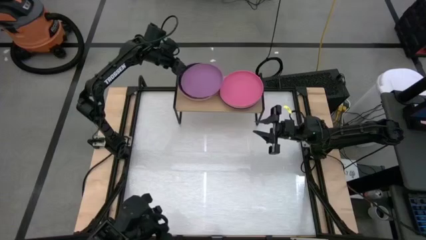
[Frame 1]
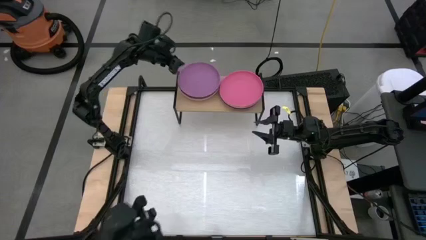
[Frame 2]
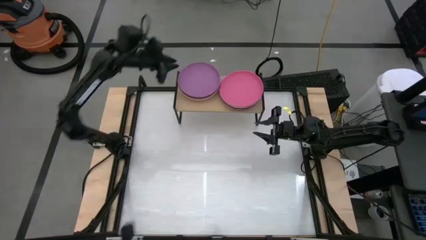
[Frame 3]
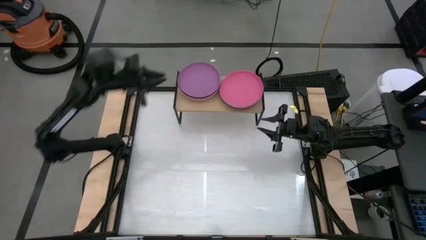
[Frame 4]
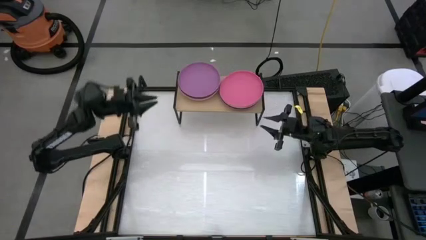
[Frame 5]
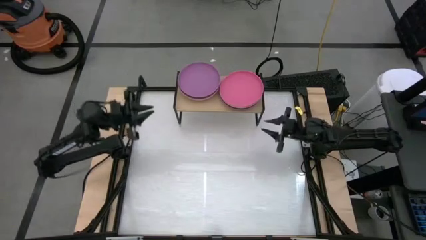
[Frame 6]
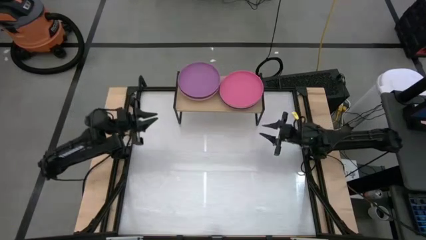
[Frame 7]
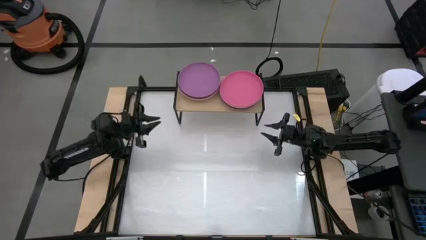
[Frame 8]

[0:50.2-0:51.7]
Task: Place and stack plates onto a shelf
Return to Home Position

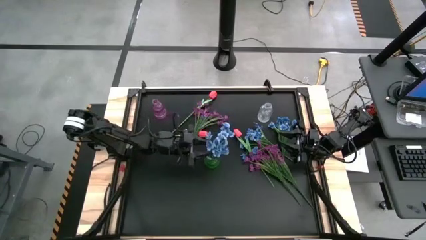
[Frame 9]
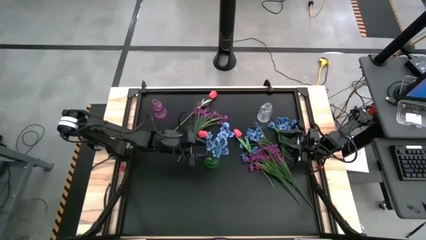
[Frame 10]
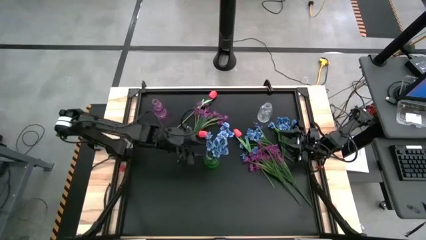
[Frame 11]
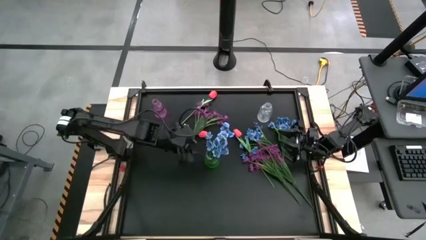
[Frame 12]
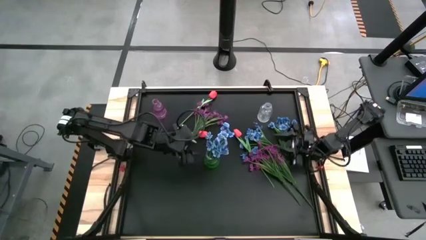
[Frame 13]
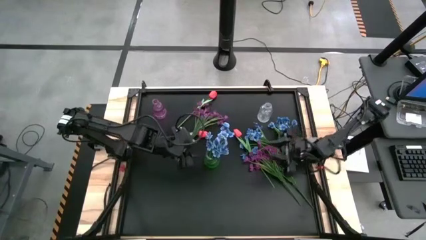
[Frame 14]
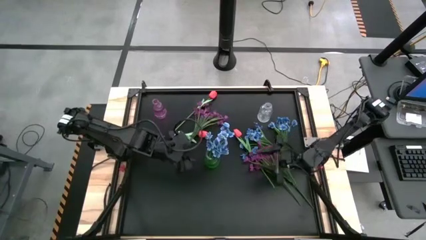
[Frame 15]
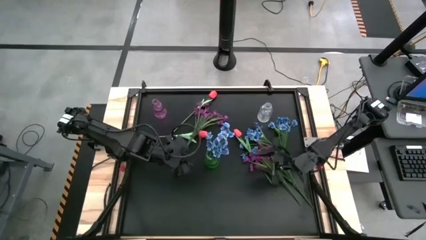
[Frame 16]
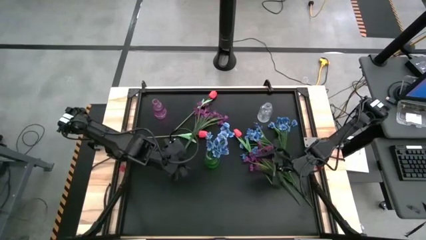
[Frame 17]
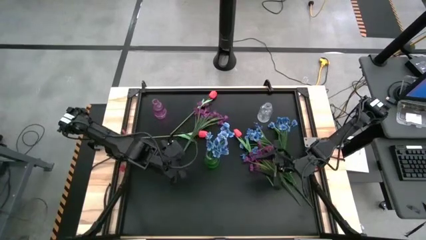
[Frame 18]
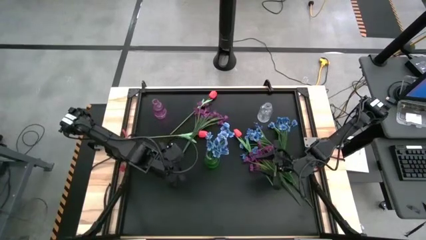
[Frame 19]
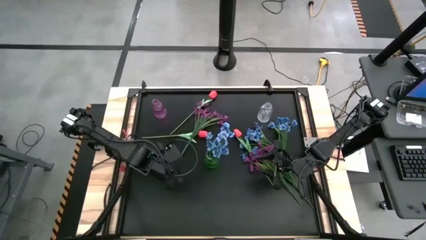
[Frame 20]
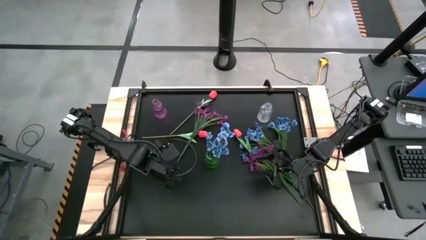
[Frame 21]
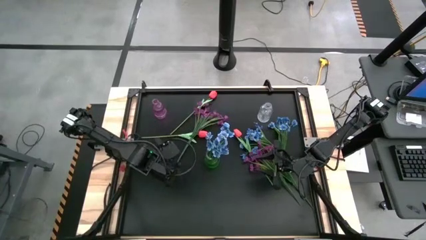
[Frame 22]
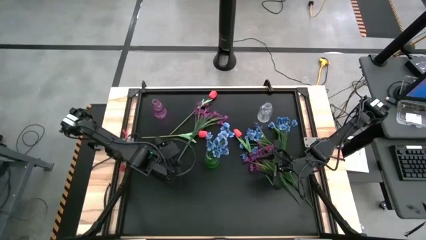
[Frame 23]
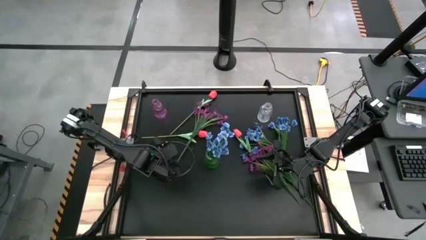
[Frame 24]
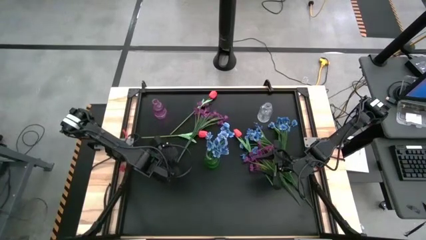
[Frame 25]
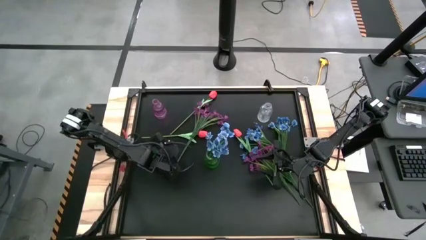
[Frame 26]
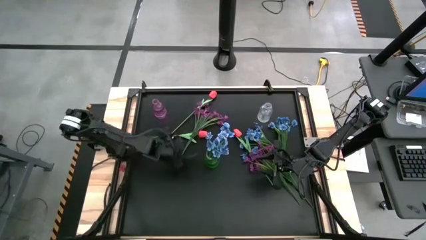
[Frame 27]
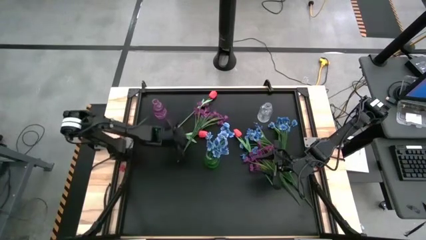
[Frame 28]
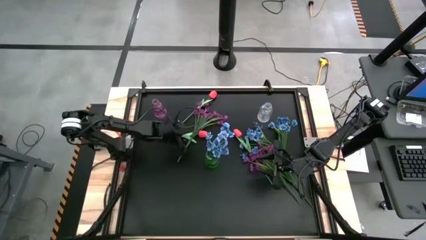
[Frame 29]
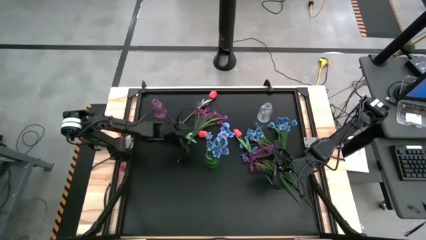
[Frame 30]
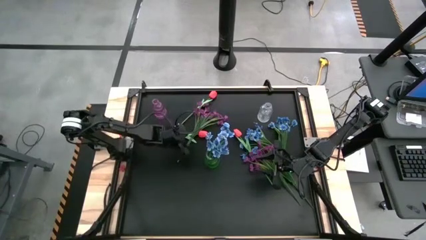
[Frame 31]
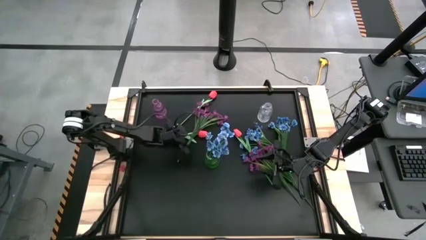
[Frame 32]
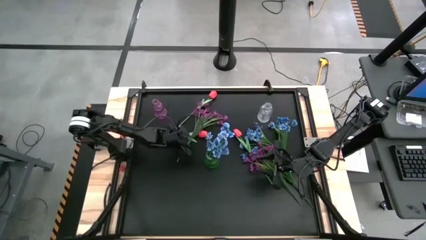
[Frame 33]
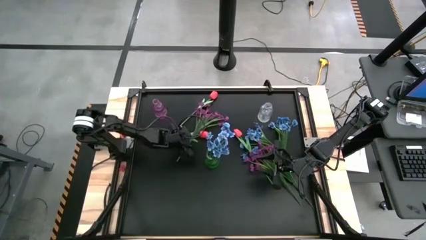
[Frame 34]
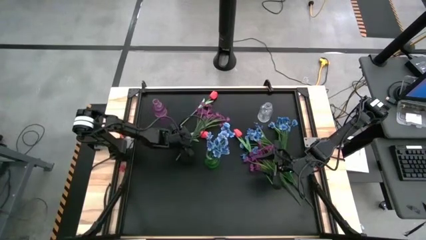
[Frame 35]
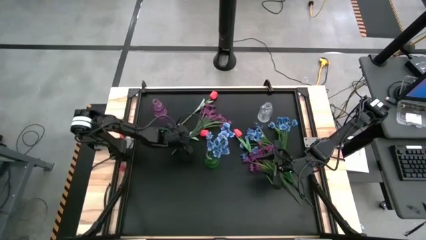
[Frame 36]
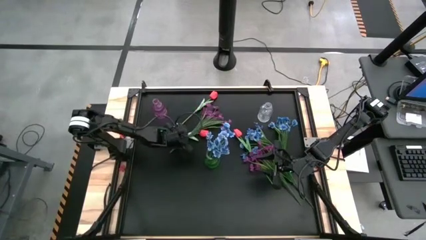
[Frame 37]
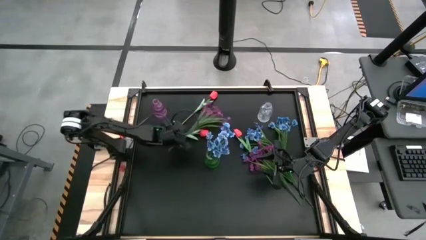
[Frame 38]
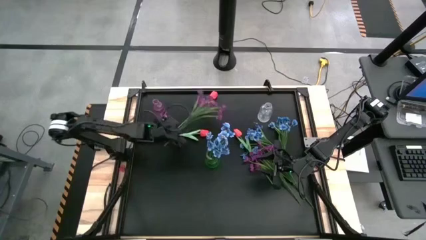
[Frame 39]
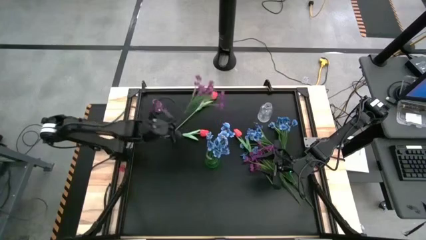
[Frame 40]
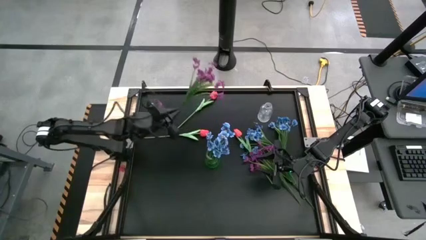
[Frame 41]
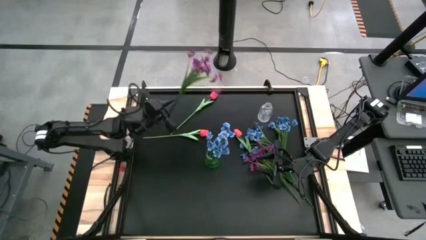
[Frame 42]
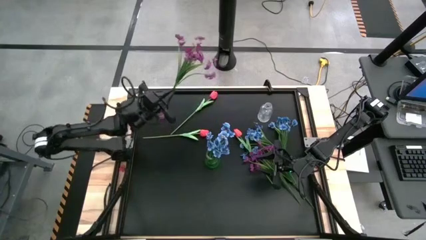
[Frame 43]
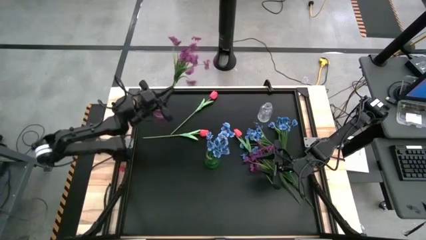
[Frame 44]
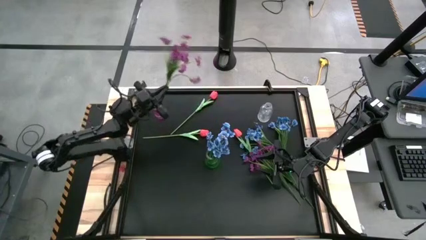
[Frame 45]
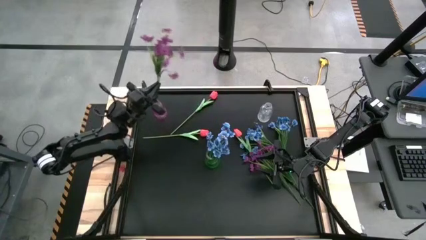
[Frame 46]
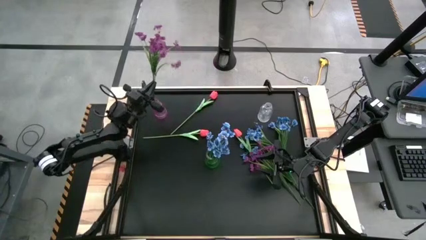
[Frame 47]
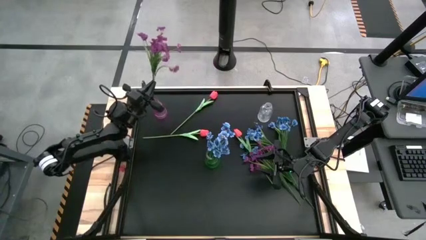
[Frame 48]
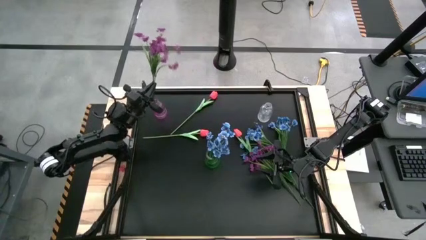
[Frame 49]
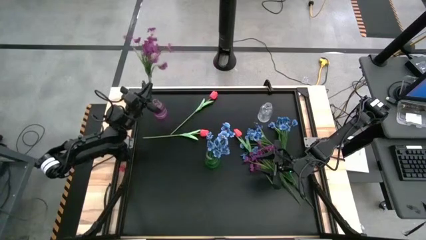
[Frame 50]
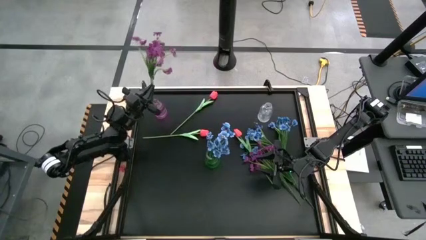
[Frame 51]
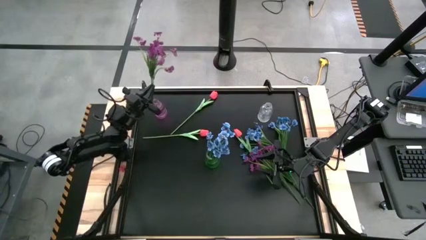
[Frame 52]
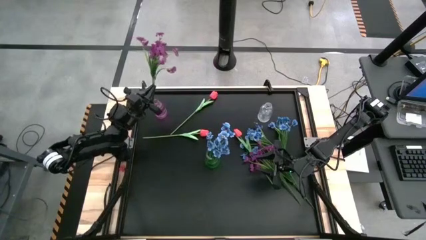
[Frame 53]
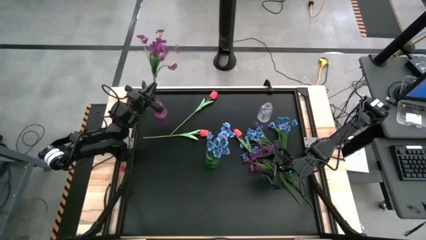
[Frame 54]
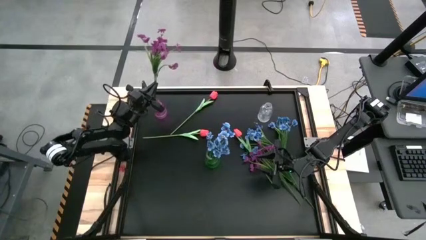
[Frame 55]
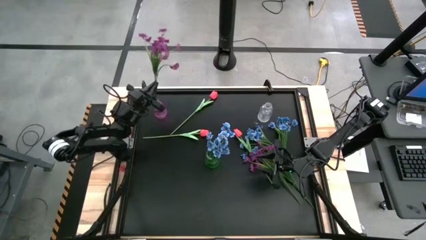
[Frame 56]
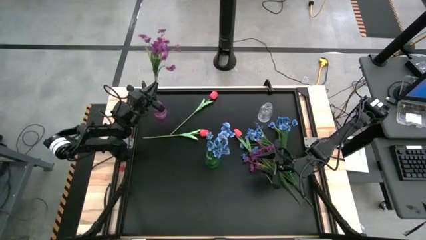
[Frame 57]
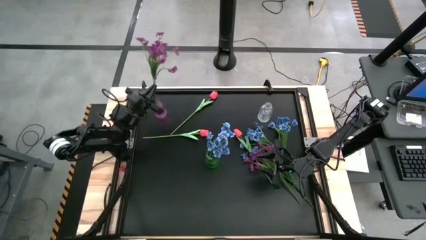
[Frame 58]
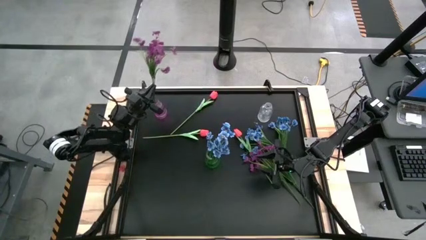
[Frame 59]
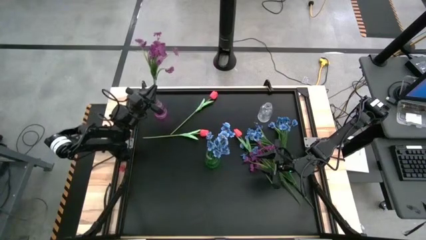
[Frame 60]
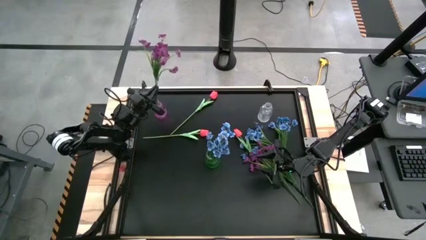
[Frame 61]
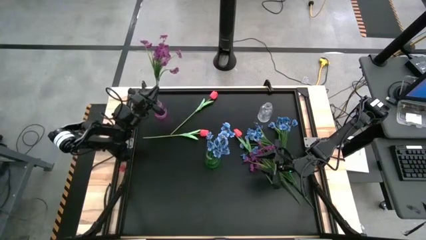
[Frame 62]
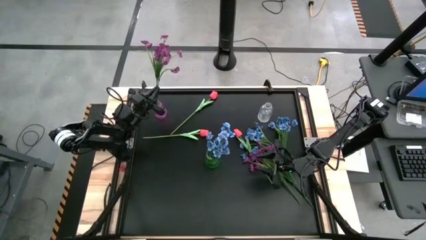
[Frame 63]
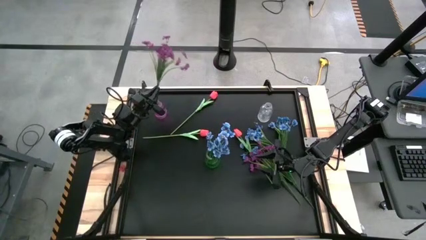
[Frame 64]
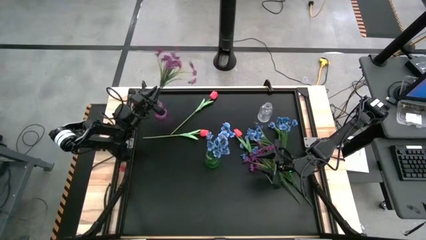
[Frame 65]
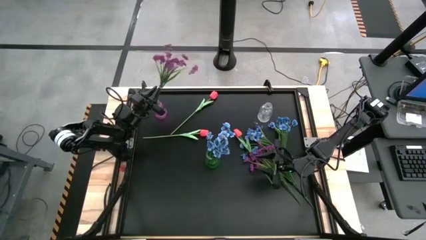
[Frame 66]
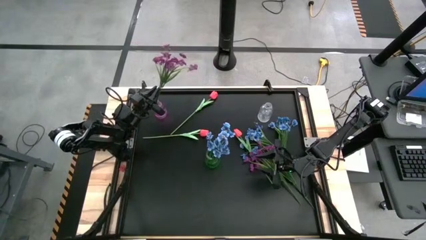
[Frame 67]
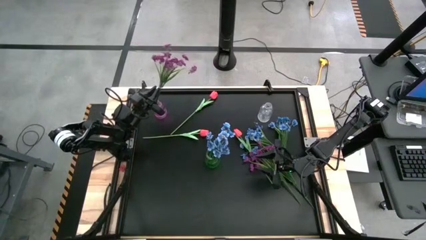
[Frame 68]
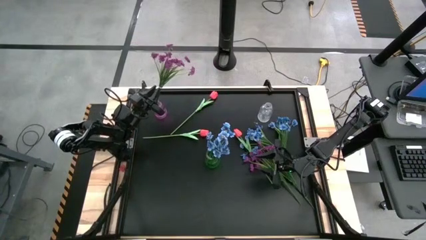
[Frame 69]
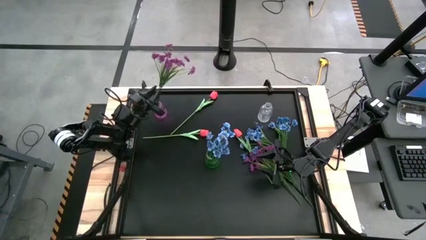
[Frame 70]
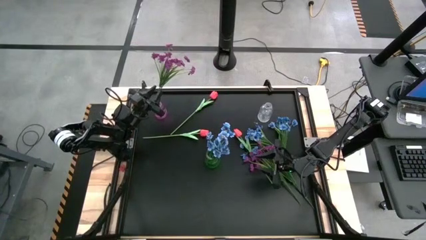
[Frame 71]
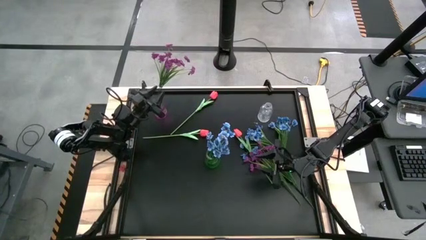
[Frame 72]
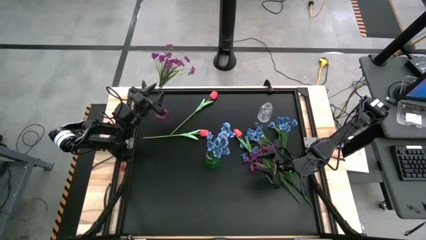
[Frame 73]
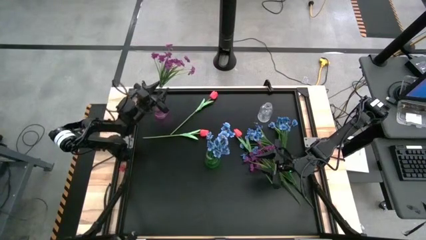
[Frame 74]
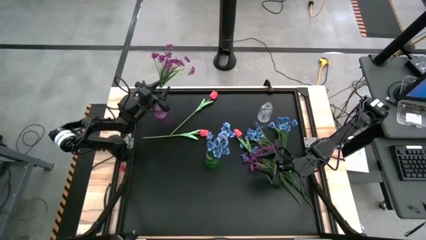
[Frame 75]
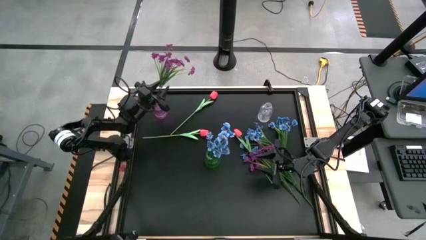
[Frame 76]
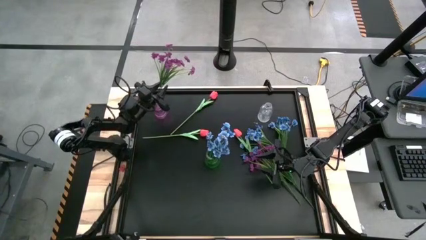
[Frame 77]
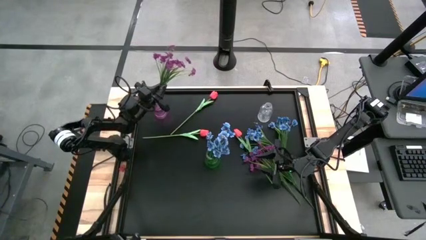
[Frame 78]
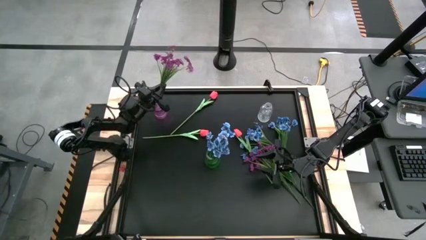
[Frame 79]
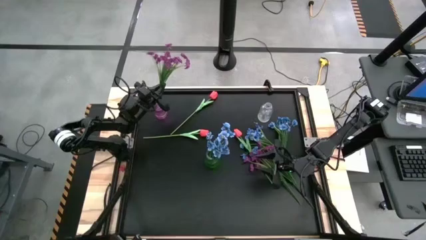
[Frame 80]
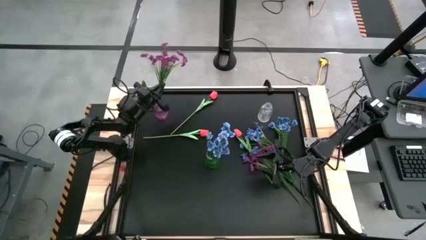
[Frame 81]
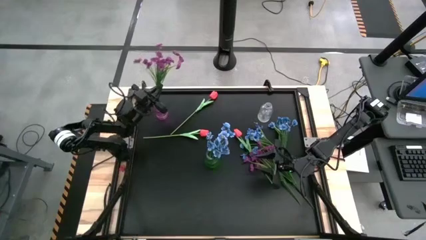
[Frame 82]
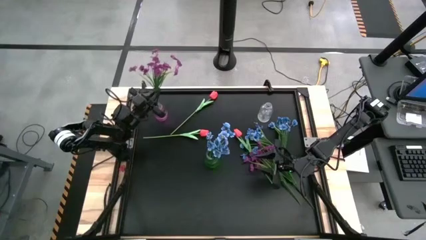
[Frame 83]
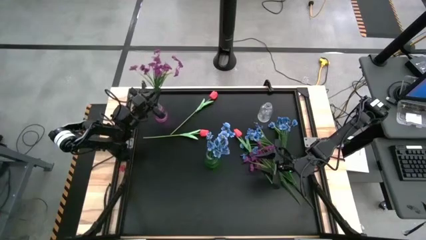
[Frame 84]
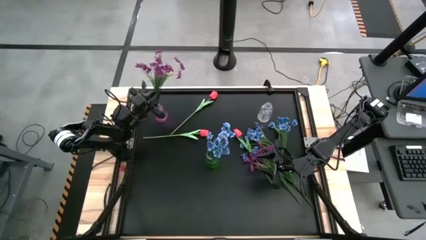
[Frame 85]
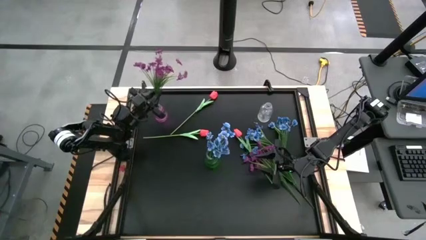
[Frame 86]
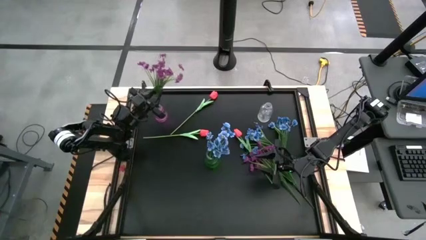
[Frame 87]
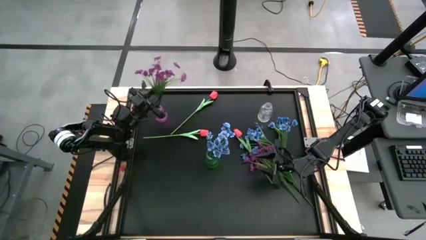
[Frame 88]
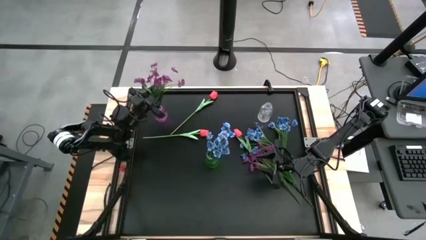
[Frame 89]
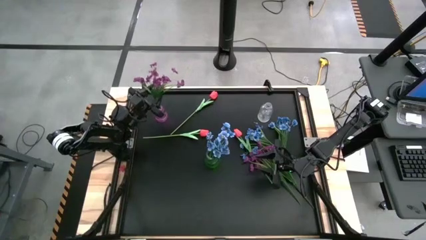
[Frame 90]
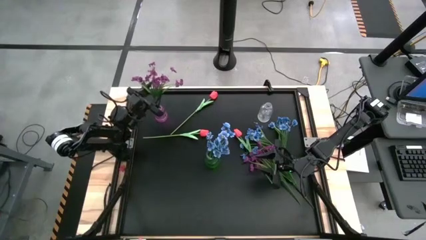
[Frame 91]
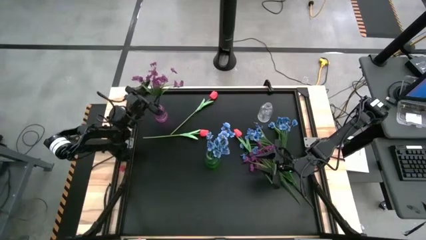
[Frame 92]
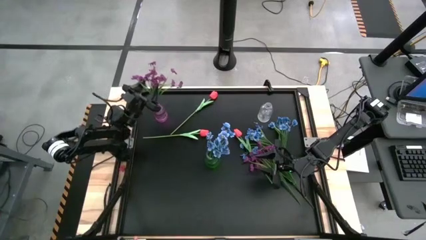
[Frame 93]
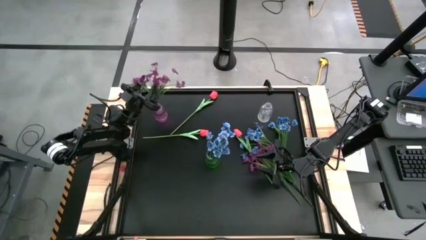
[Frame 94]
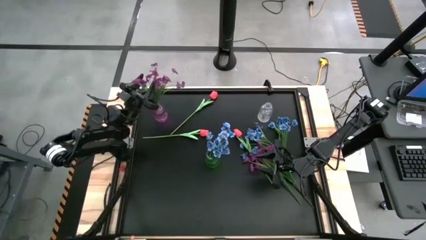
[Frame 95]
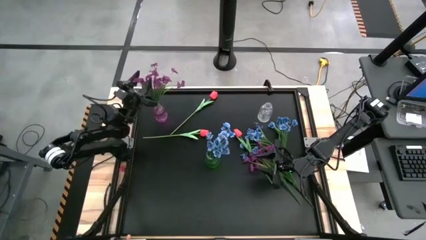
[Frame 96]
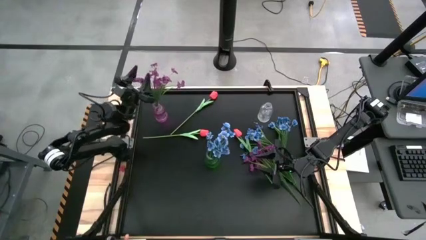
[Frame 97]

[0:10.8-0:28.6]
Task: Sort flowers into vase by color
Put the top left purple flower into the purple crystal vase
